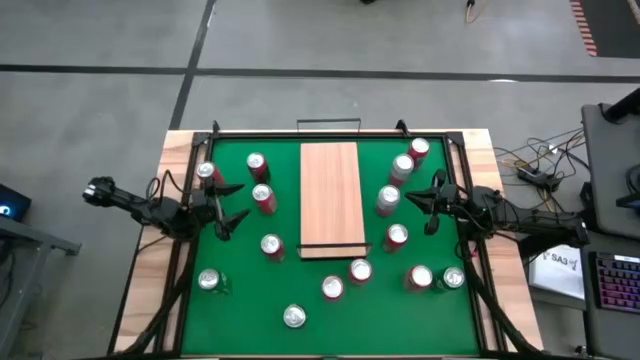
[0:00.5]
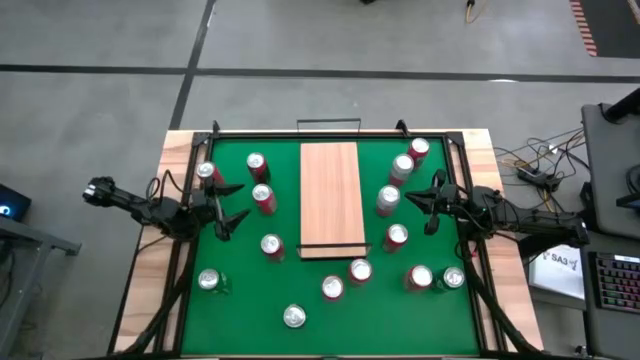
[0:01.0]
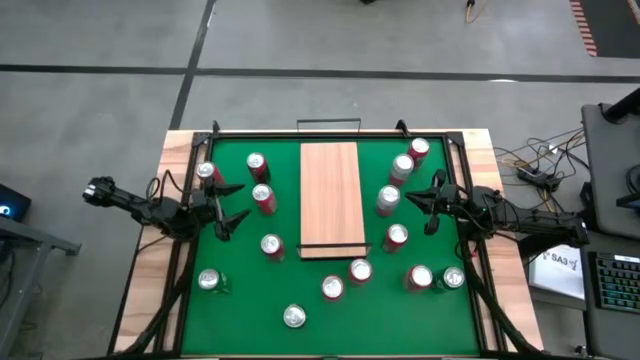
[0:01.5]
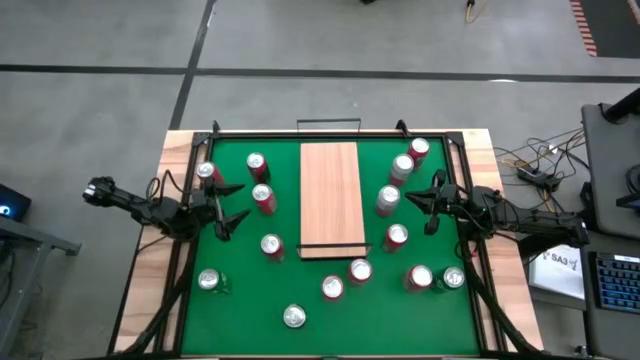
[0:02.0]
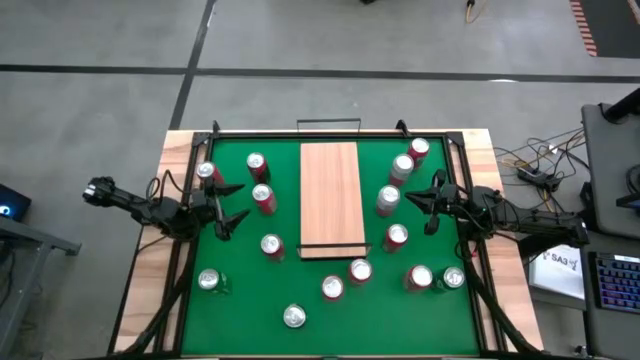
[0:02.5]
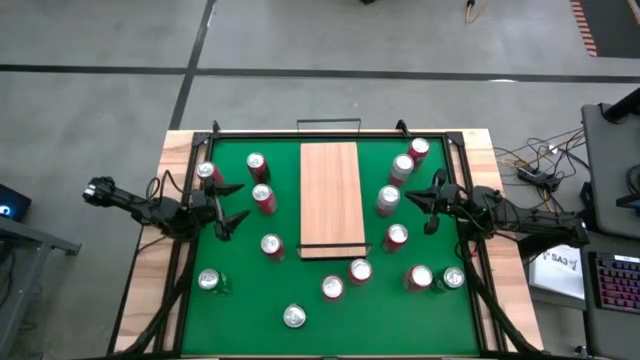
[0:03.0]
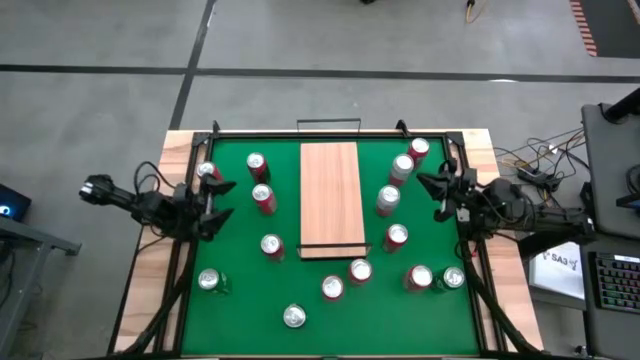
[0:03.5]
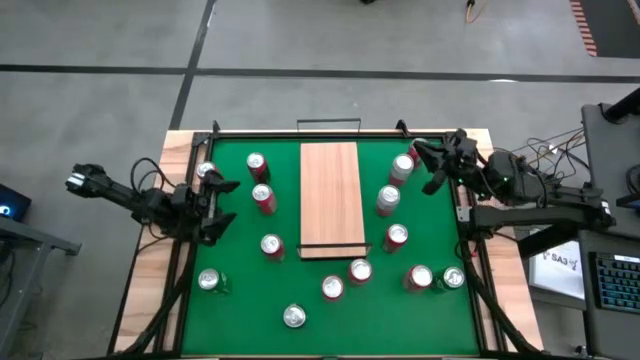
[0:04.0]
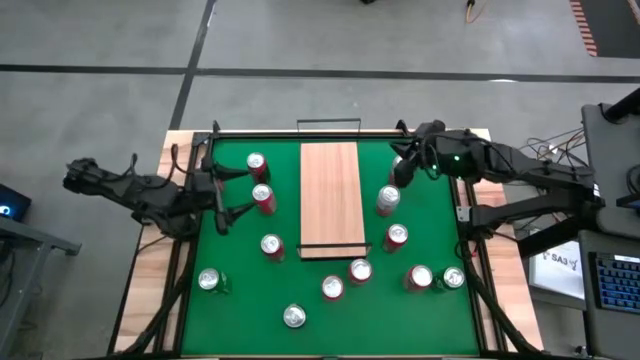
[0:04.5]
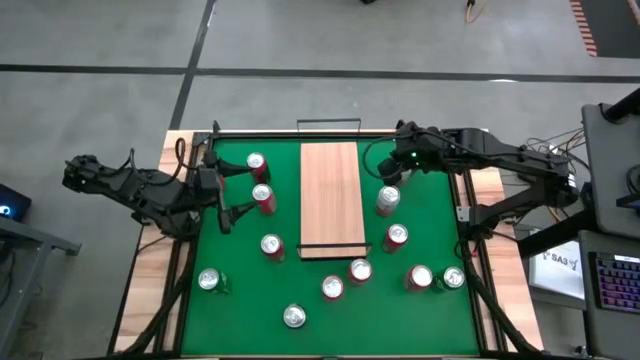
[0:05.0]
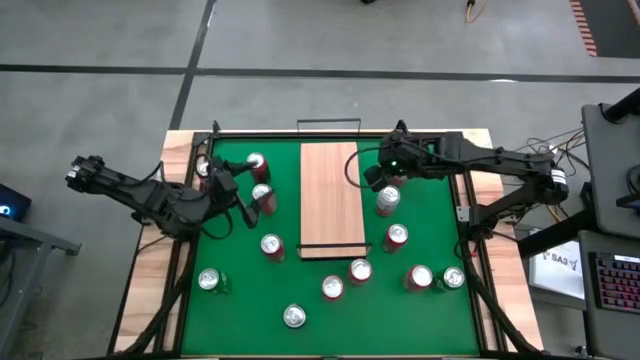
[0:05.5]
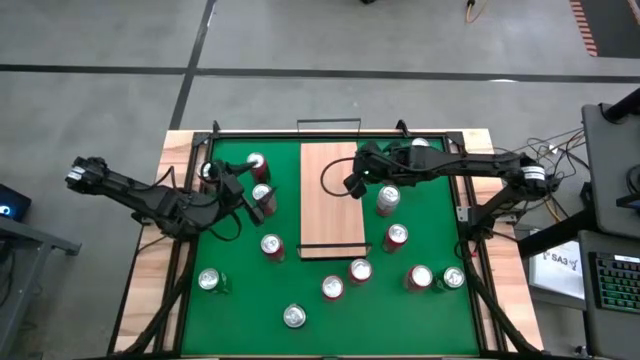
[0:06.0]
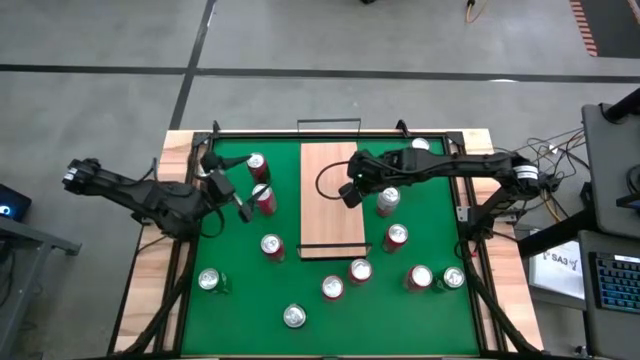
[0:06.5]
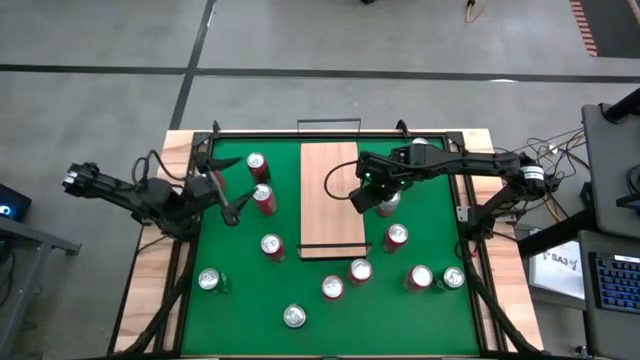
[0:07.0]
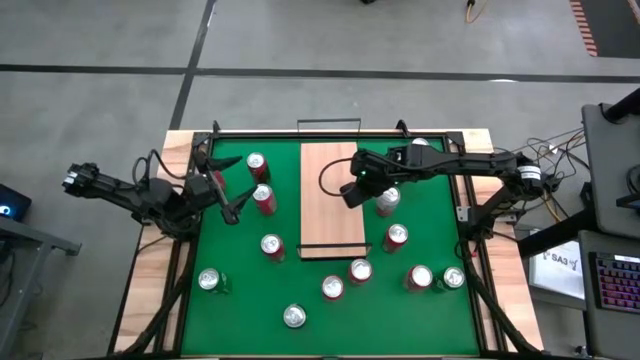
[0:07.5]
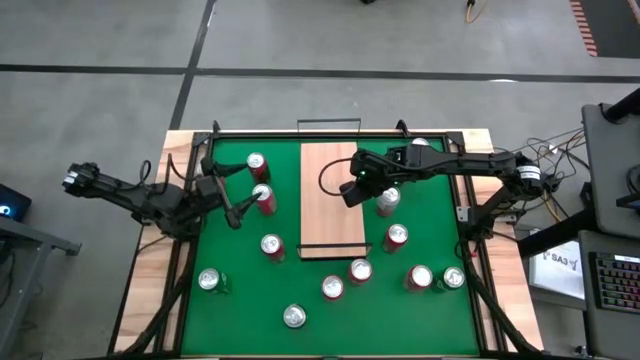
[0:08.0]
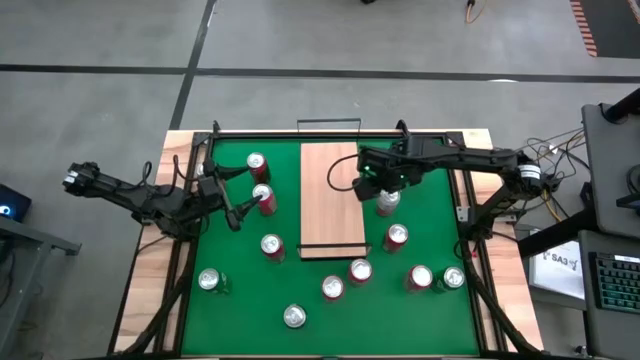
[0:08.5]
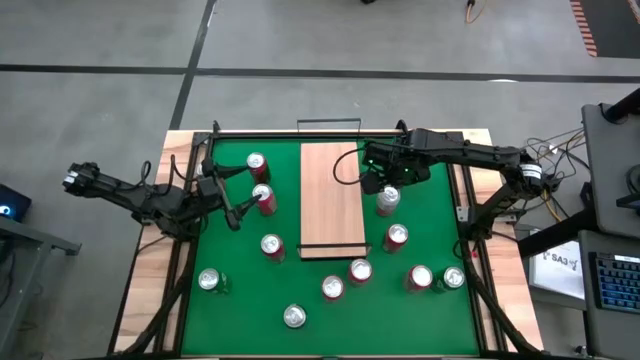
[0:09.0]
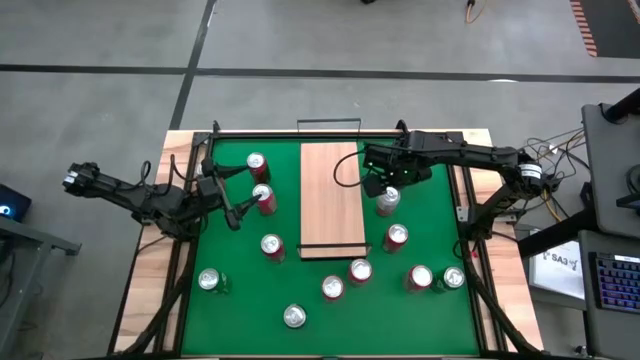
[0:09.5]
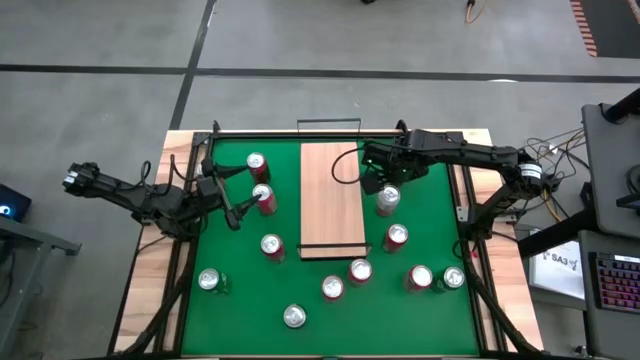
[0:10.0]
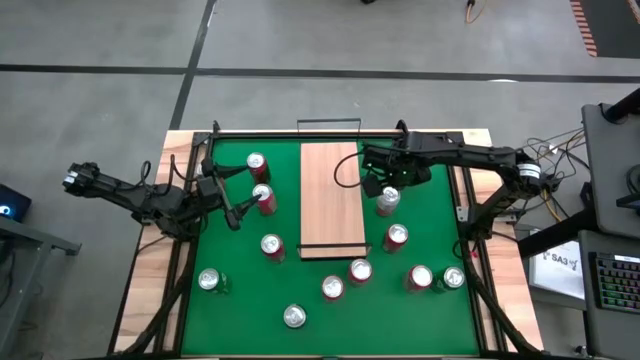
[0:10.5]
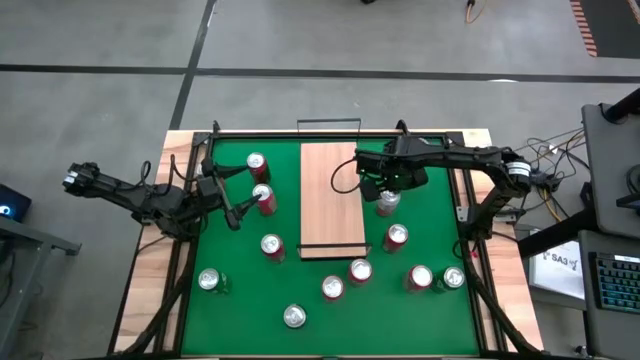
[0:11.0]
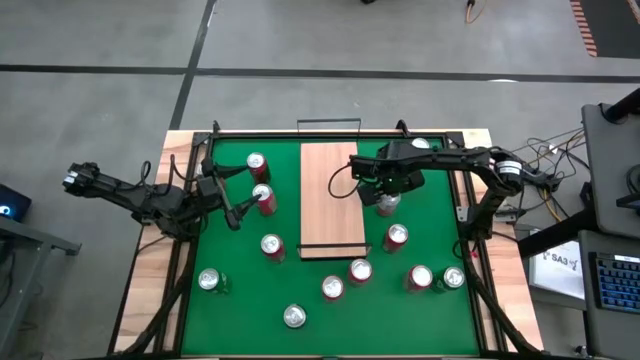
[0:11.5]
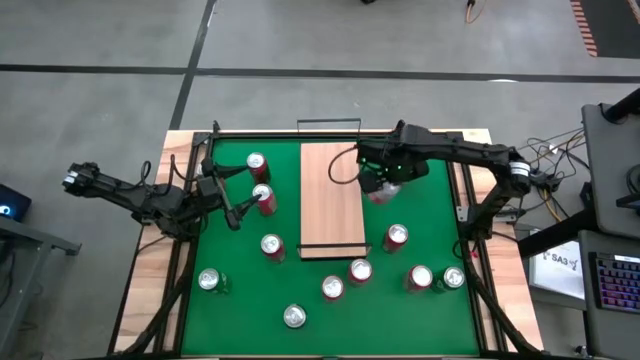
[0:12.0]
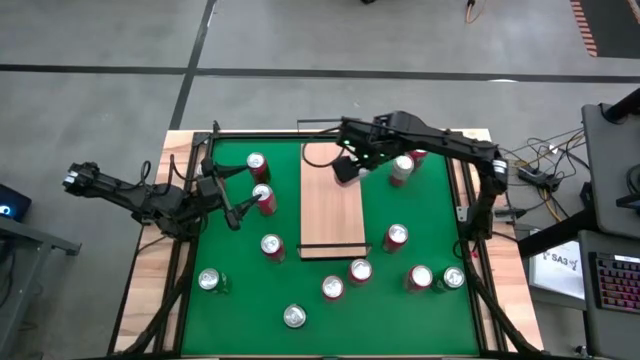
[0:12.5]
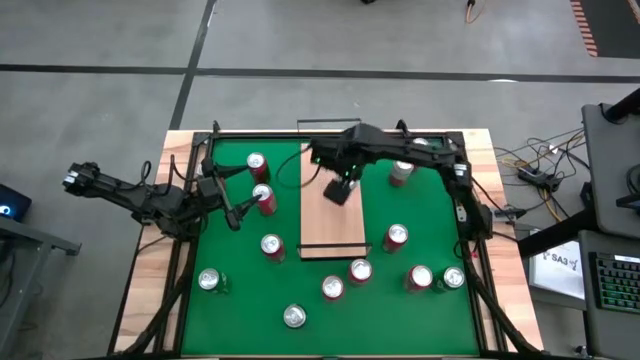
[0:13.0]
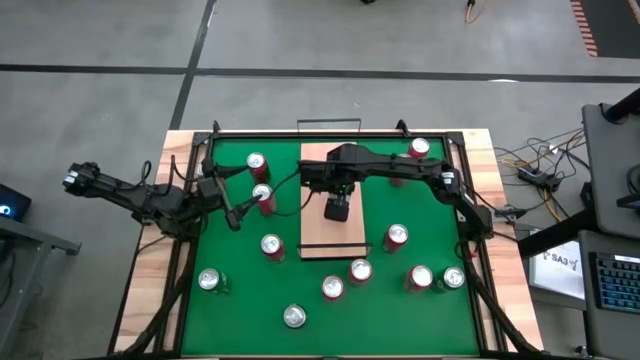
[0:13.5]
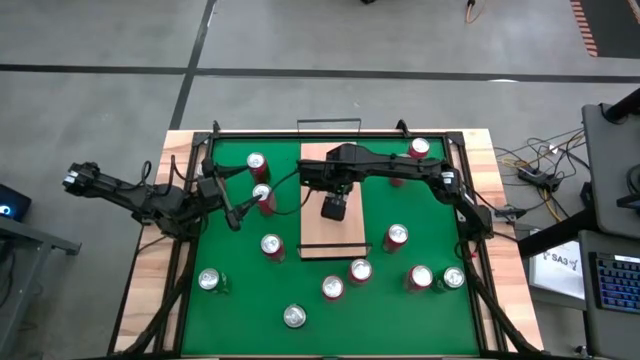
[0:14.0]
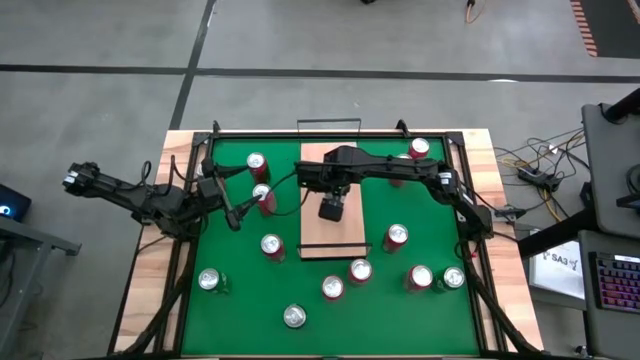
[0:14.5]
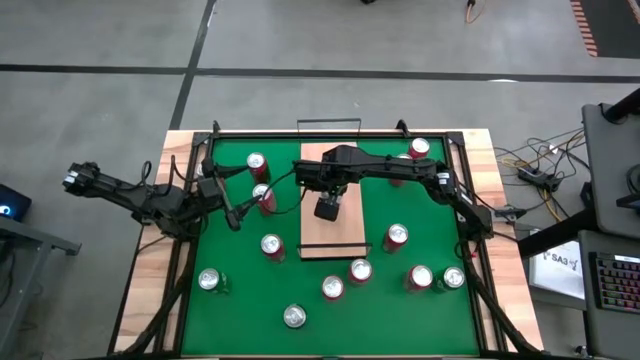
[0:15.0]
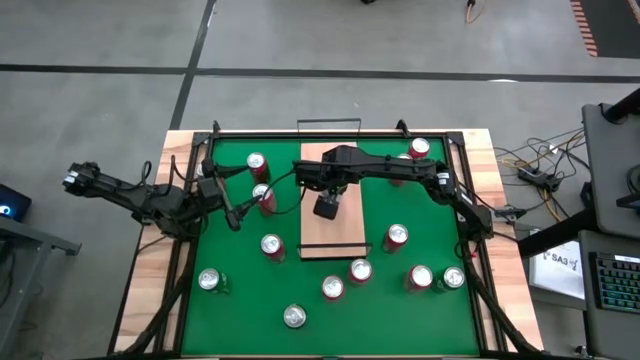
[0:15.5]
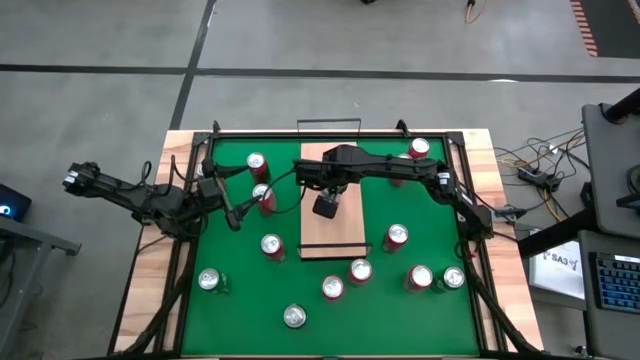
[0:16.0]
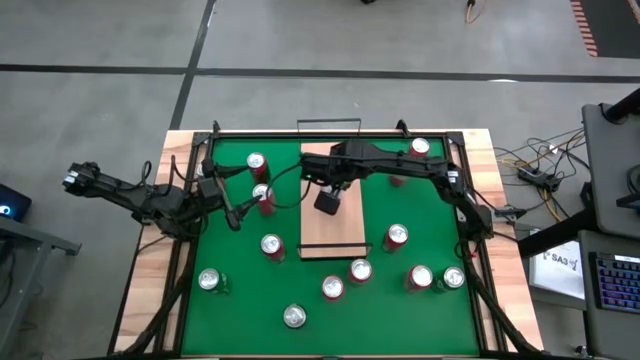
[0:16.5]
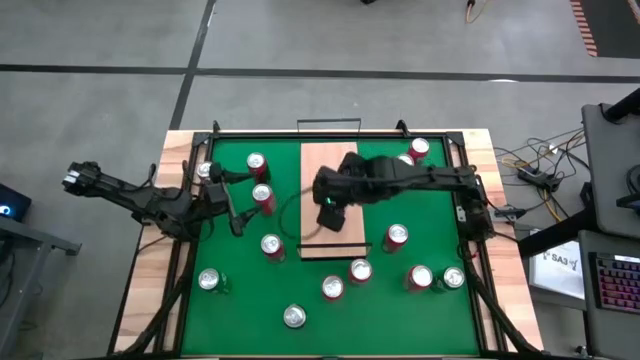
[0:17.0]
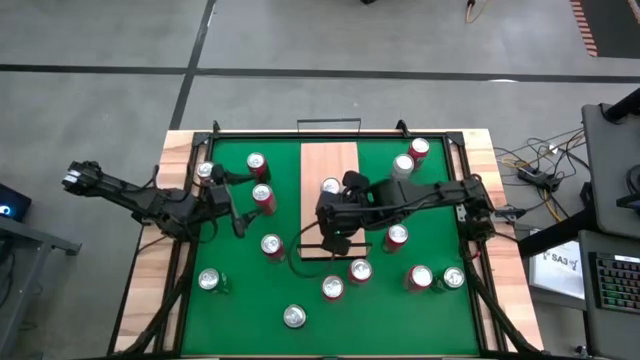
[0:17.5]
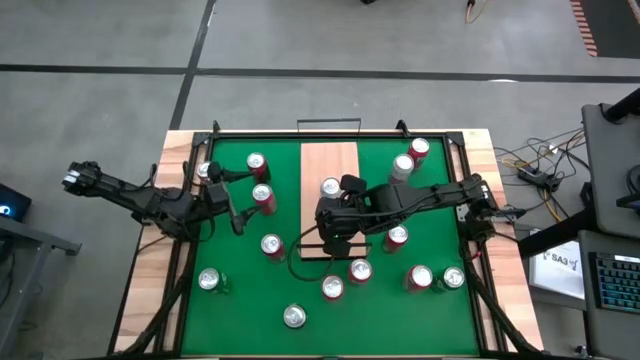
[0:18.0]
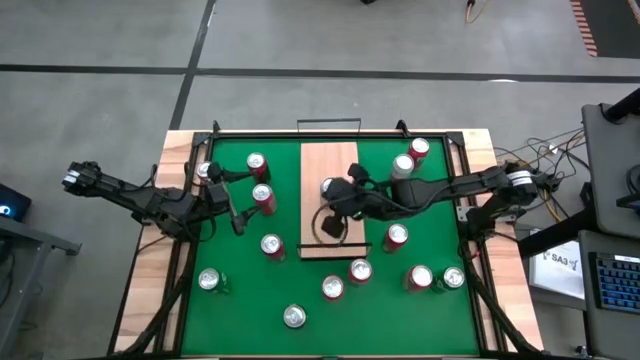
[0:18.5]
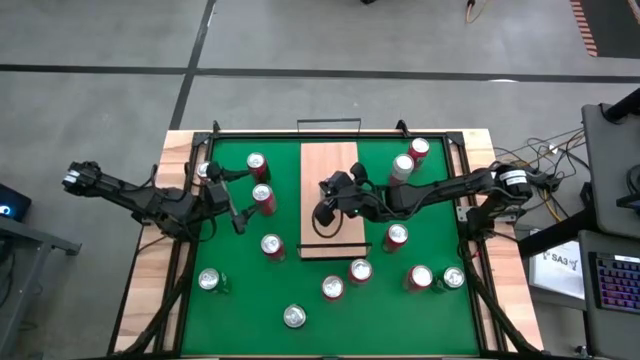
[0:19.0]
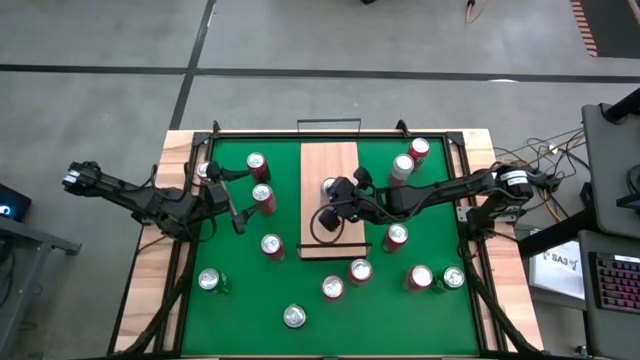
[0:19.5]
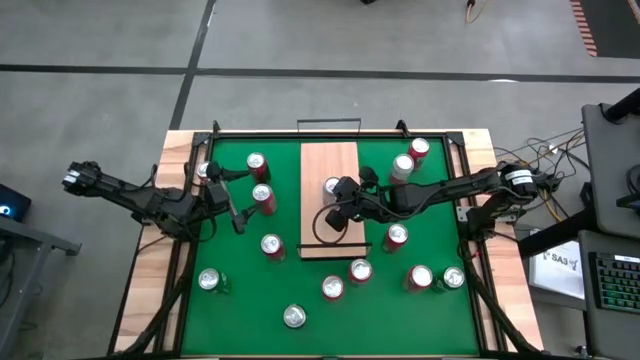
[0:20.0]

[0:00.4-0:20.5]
Task: Place canned beverage on shelf
Put the white and pink soda can on the shelf
